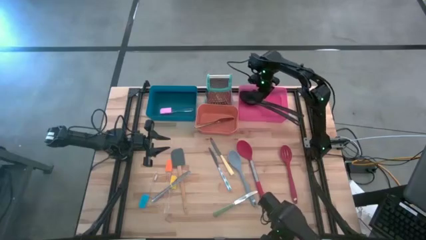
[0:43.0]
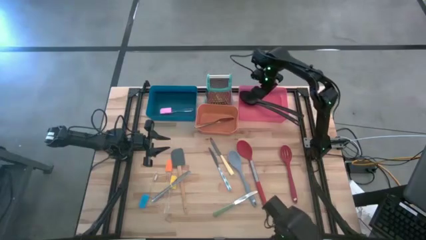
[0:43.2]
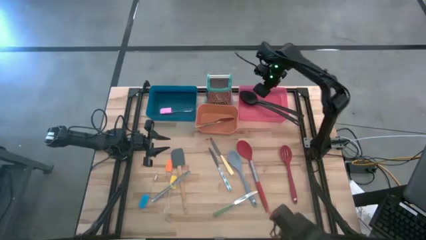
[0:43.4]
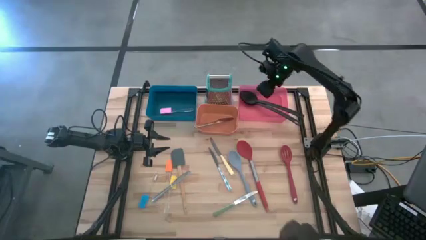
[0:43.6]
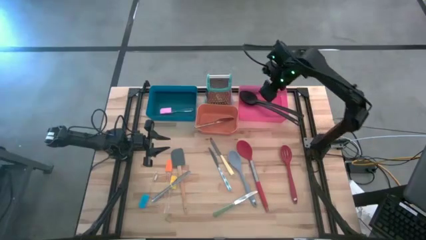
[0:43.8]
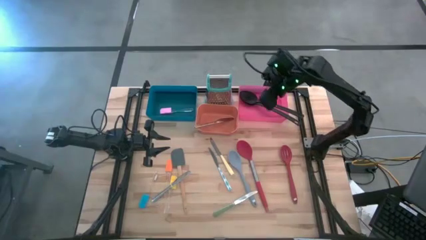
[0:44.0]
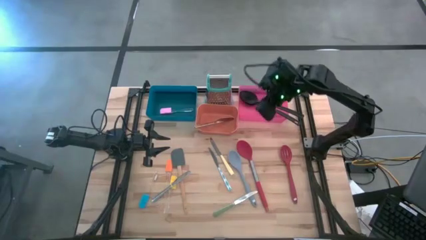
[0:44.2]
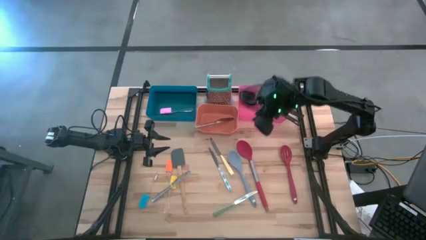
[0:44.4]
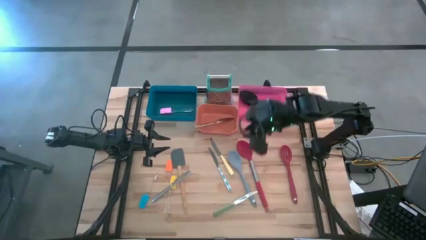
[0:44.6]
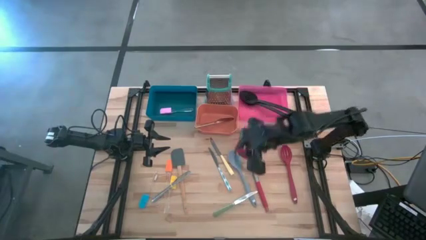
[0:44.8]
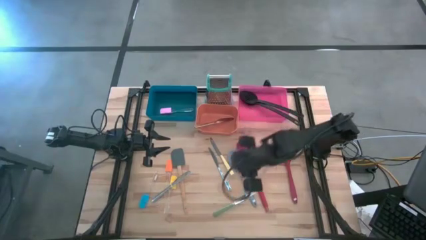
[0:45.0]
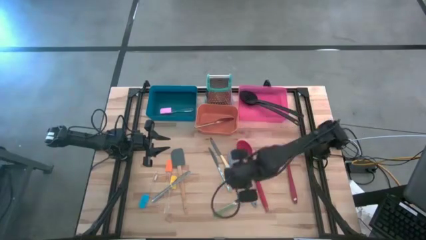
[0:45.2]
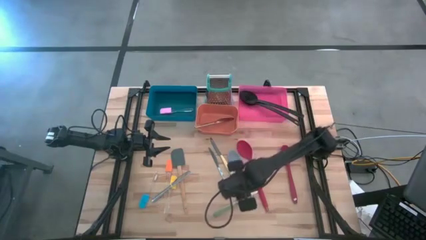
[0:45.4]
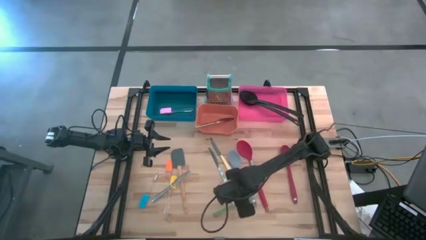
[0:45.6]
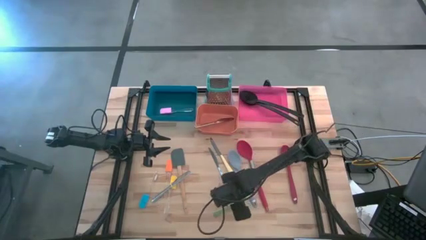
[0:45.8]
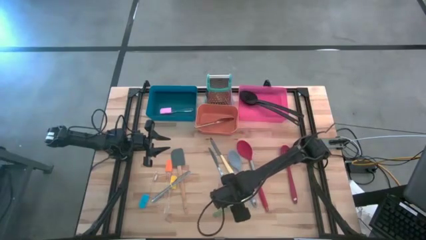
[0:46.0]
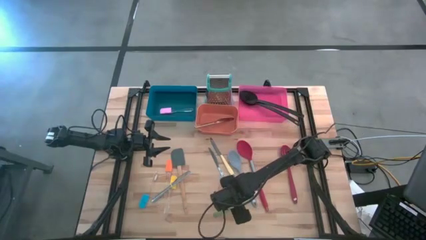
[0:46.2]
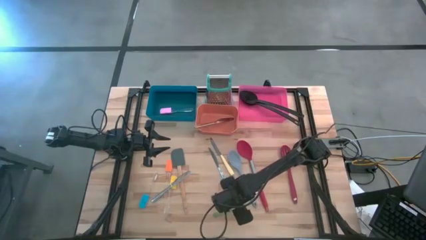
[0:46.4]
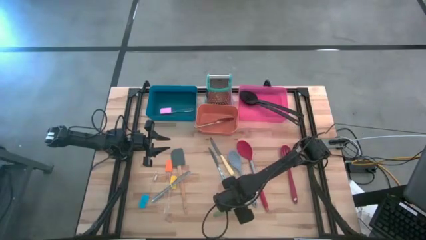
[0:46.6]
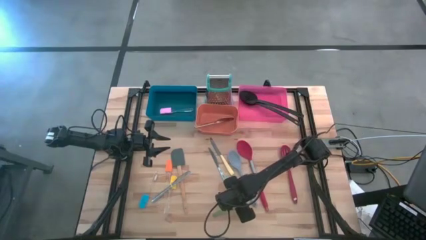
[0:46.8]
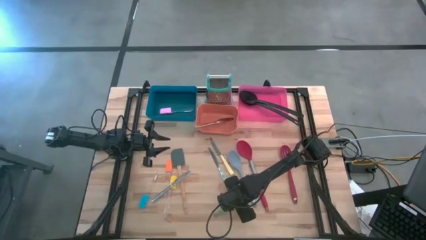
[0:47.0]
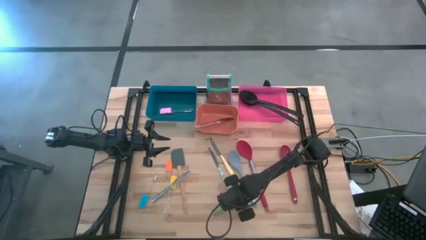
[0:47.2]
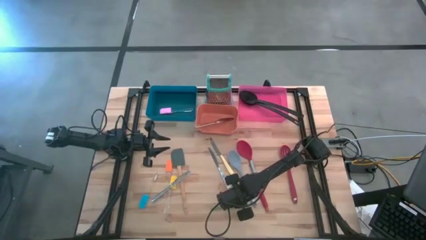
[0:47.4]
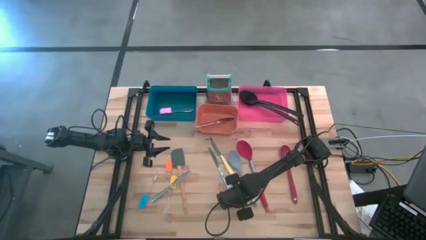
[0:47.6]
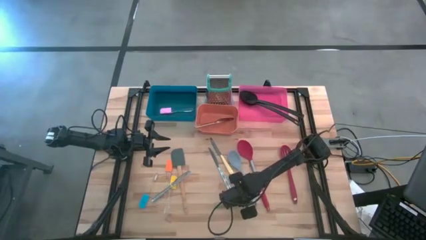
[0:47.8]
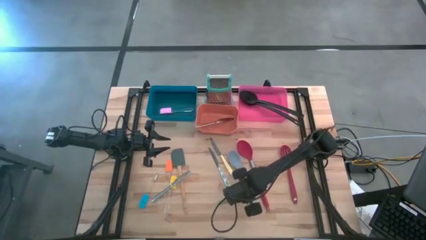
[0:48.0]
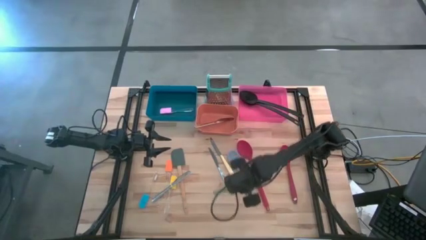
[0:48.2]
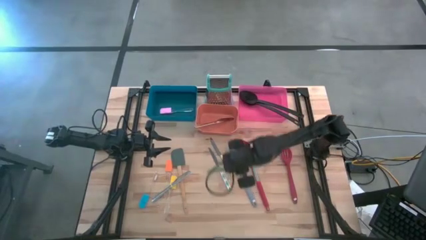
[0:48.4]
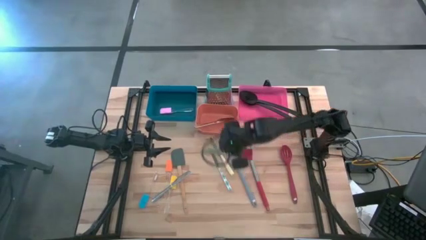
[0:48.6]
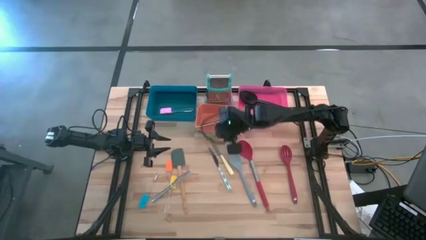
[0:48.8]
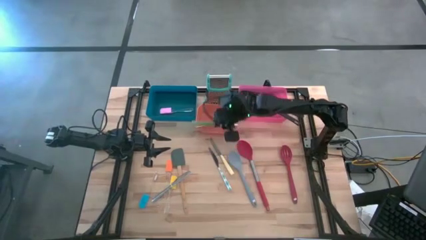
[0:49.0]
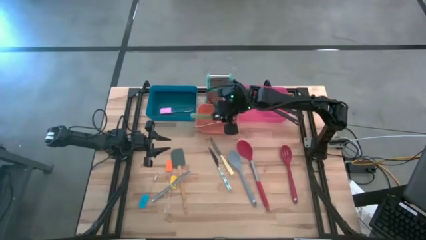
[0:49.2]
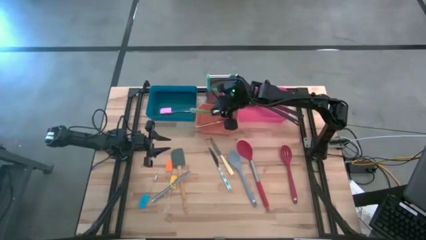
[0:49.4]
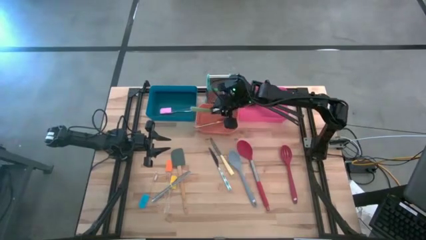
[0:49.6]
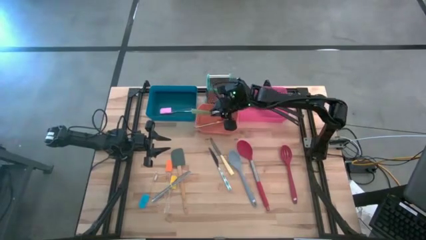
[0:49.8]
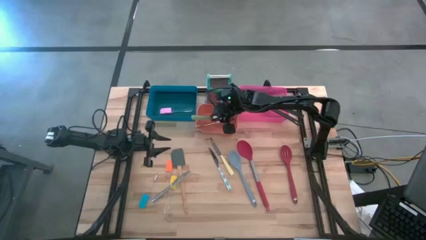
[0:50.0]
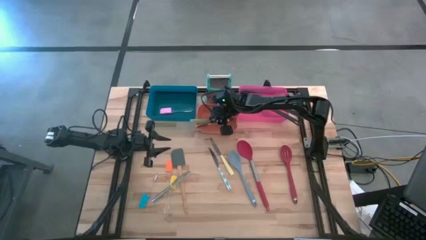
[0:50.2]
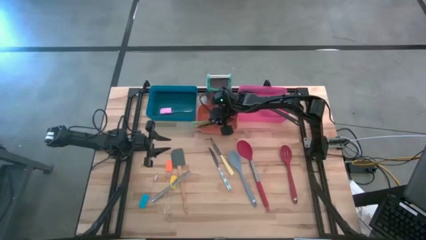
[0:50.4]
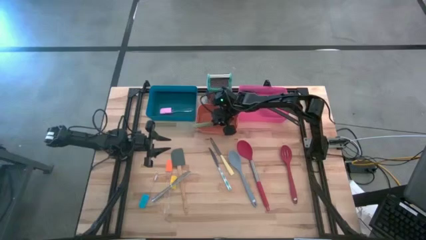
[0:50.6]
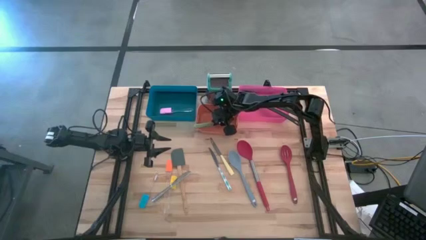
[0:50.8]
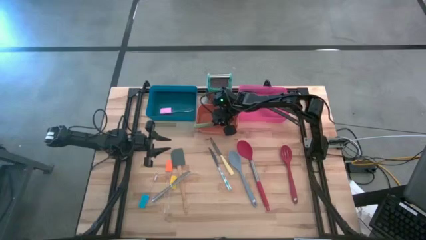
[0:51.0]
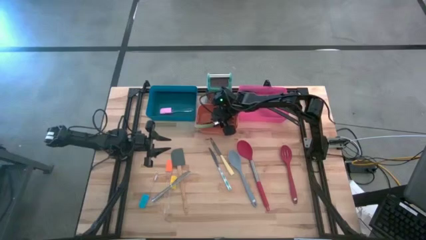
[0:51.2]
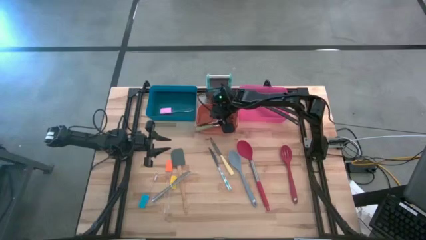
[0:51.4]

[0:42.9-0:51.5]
Task: Pick & Place Kitchen Items
Put the green table knife into the brown bin

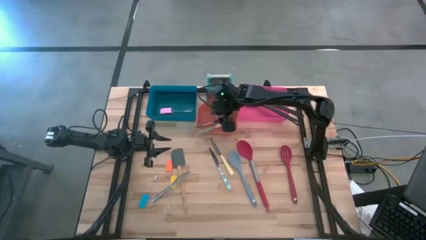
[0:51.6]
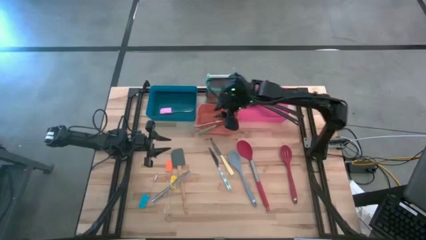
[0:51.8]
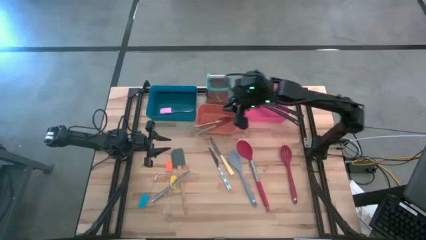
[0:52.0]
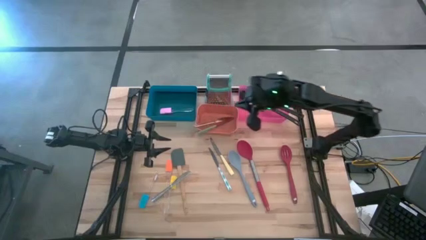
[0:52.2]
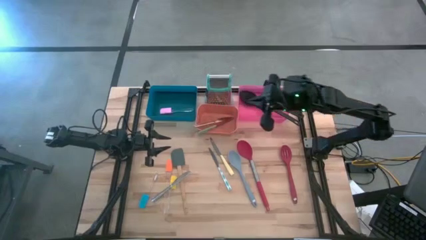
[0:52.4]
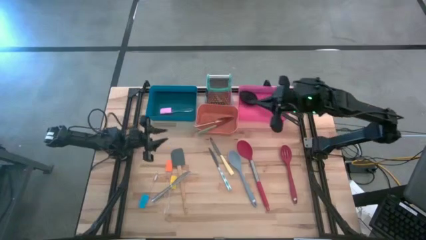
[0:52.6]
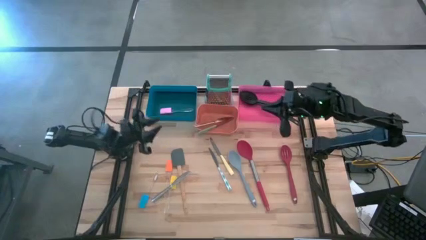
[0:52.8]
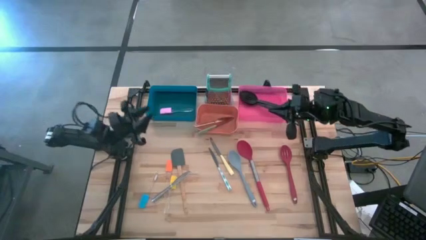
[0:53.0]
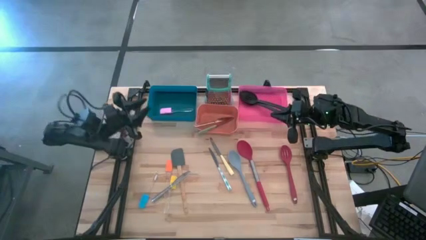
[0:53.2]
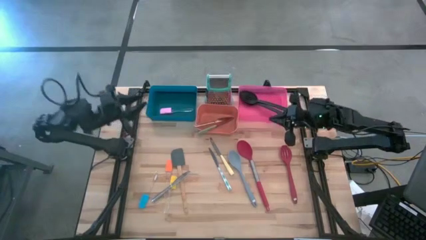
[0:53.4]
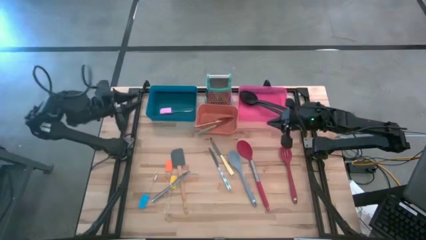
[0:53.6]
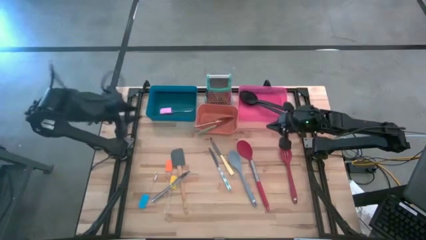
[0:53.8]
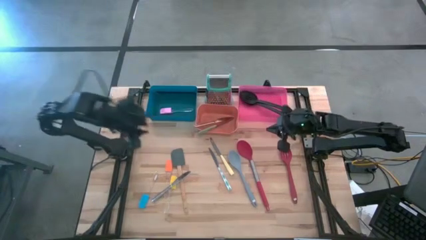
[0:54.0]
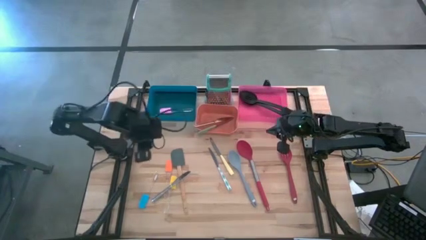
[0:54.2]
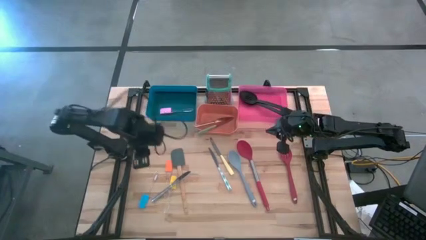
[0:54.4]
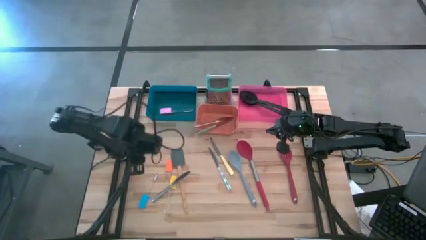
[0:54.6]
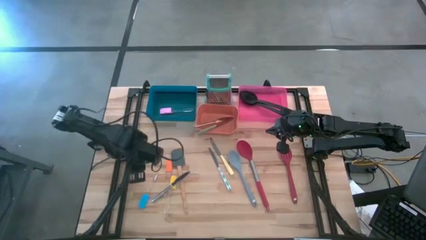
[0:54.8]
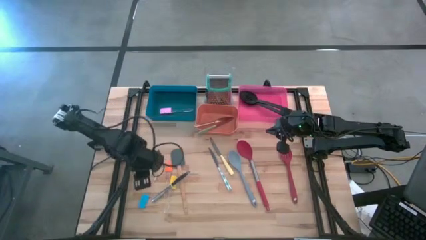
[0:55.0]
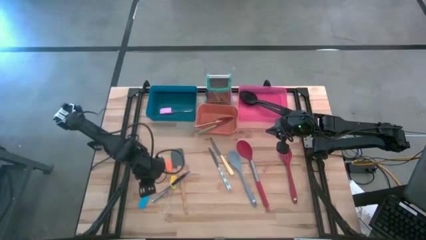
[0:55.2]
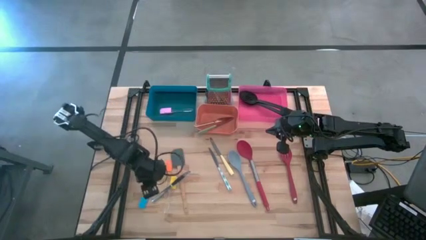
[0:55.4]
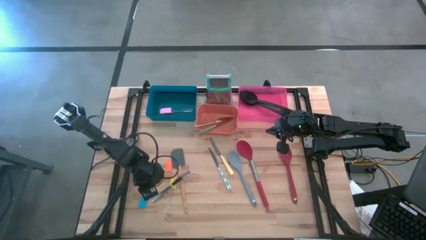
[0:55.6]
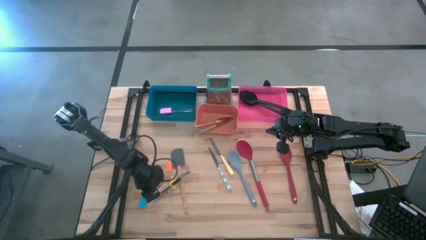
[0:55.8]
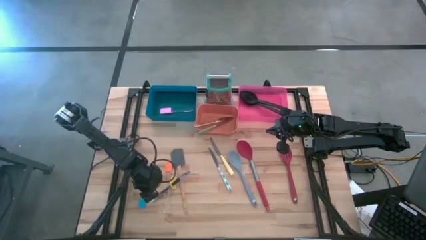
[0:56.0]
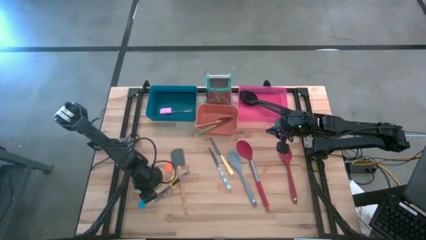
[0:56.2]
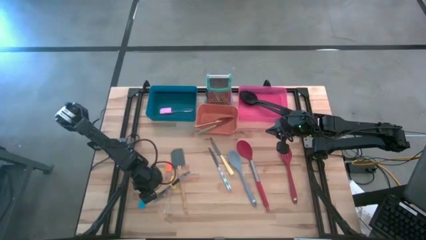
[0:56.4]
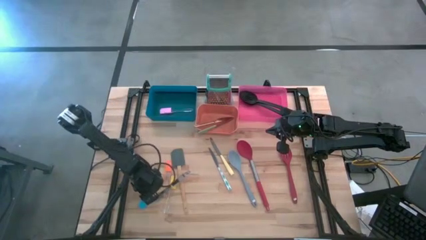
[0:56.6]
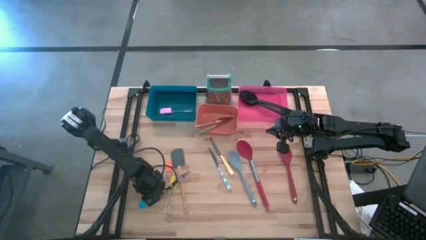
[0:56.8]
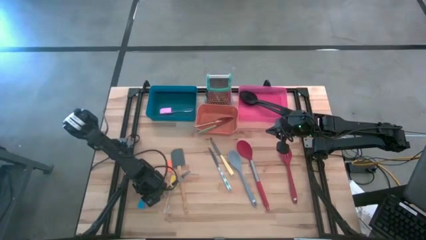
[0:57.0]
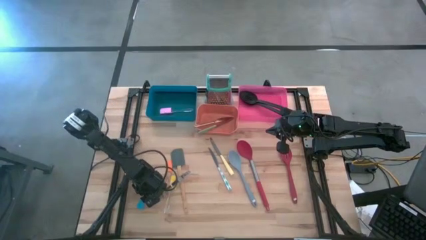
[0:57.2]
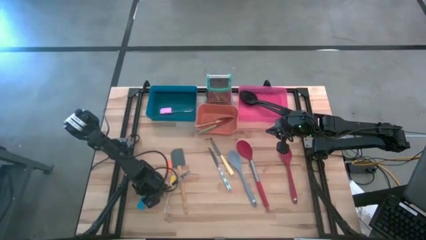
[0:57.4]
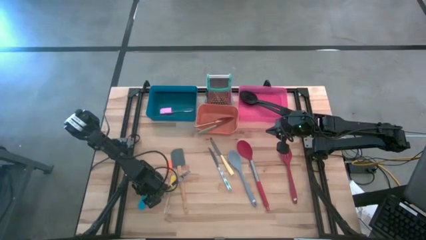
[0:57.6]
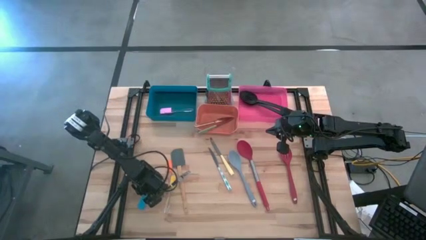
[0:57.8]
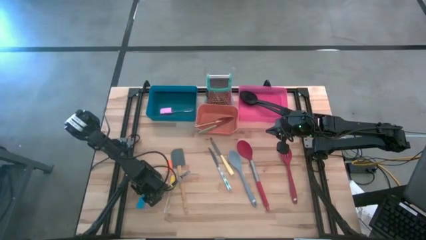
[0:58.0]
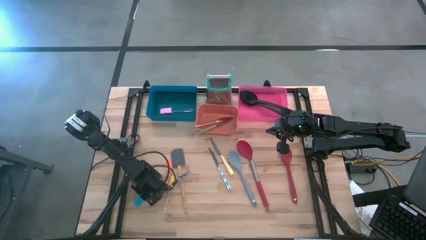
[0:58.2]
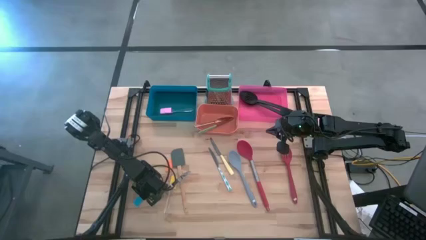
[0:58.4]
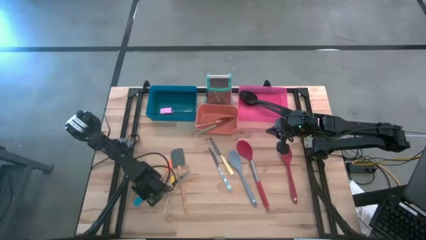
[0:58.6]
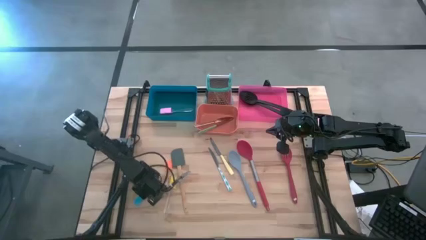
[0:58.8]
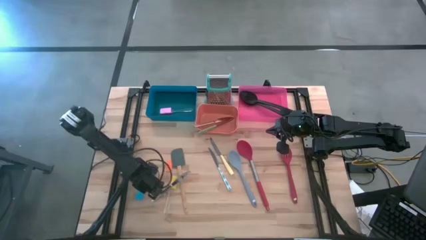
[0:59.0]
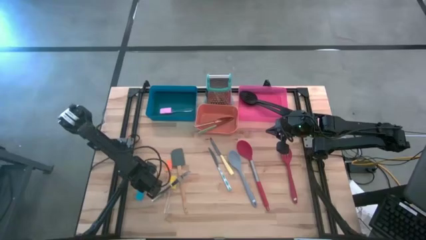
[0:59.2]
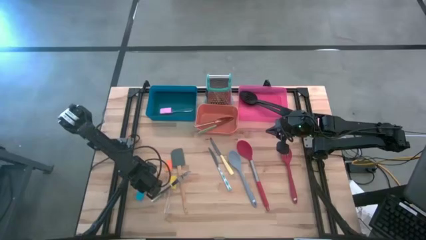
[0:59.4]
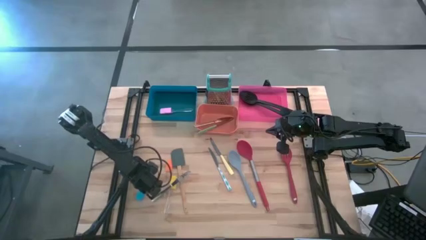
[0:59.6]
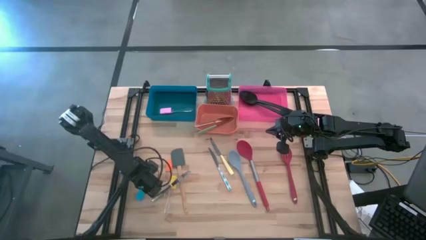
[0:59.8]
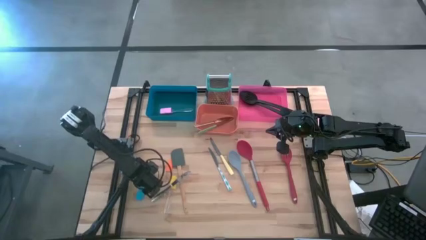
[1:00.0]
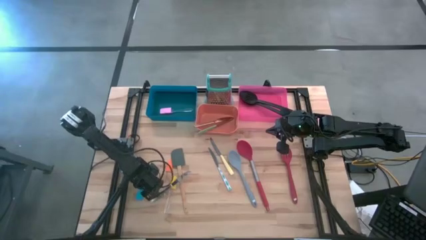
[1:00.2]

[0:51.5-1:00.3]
Put the blue spatula into the blue bin
